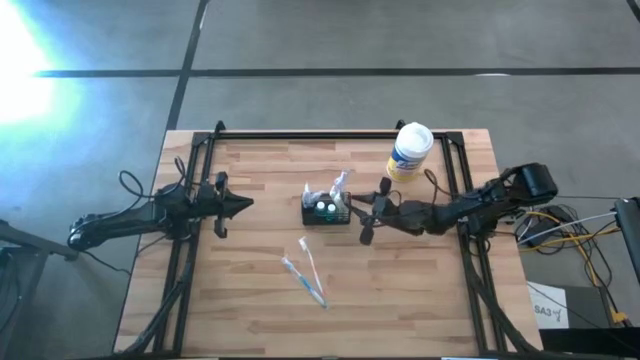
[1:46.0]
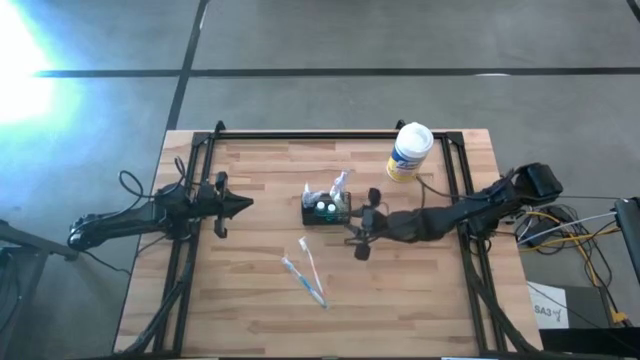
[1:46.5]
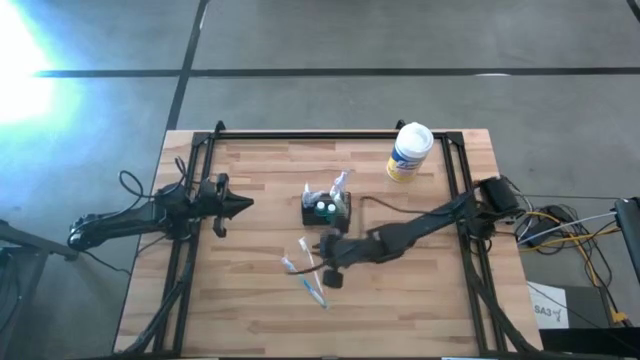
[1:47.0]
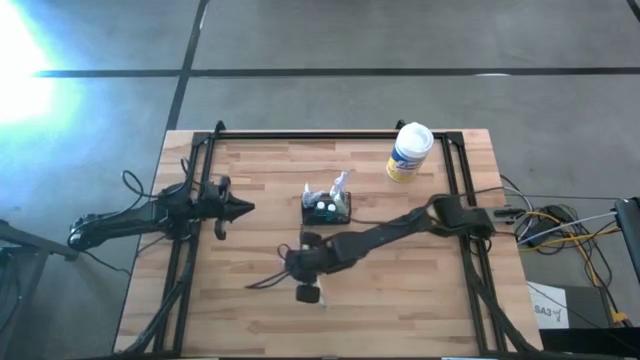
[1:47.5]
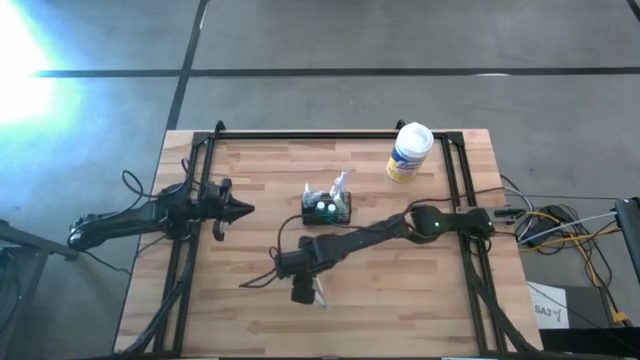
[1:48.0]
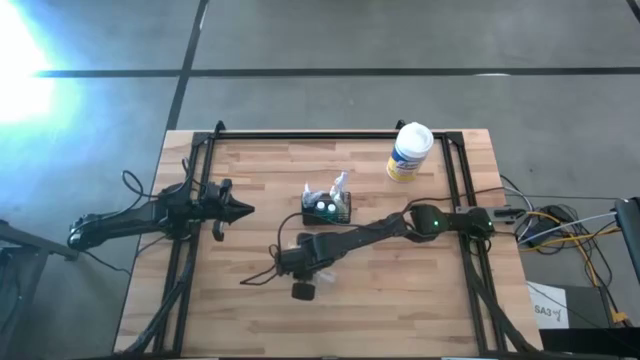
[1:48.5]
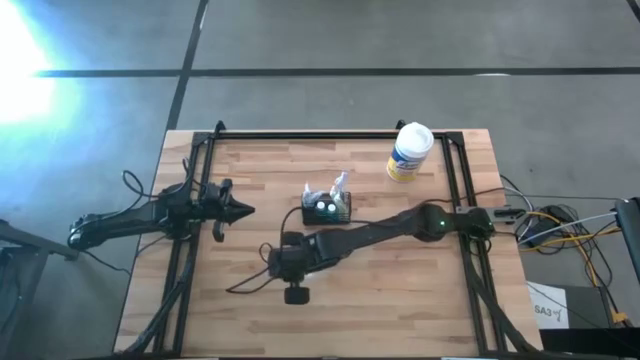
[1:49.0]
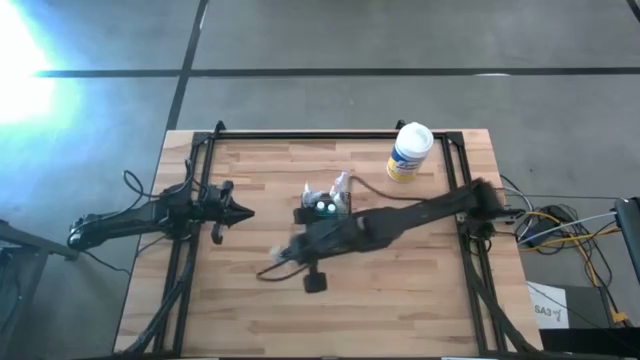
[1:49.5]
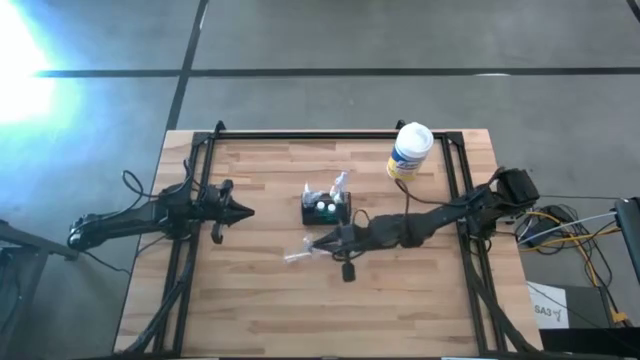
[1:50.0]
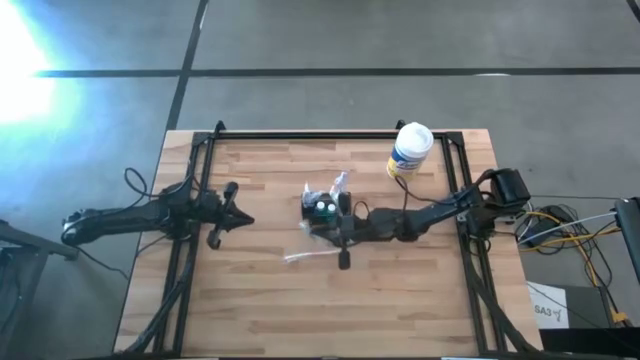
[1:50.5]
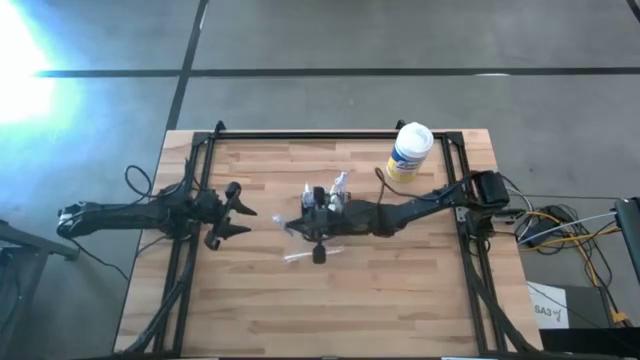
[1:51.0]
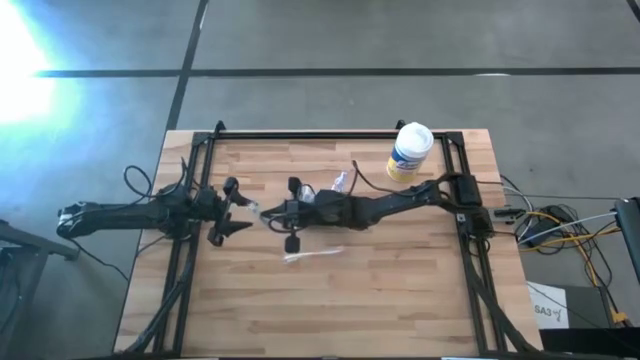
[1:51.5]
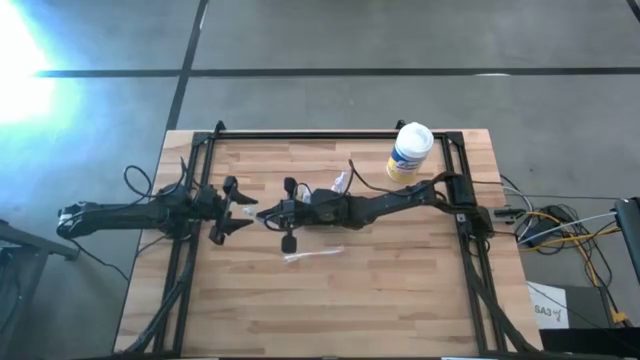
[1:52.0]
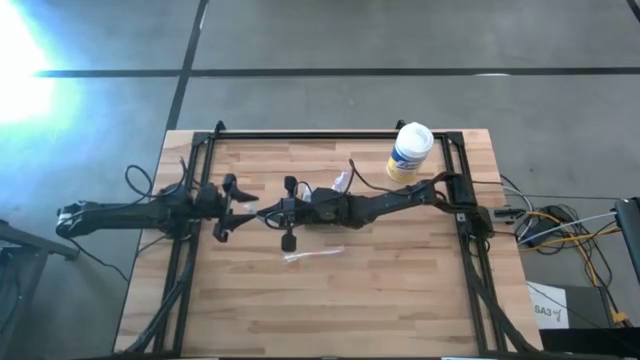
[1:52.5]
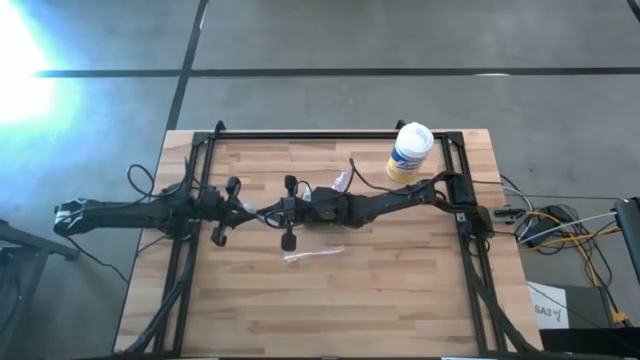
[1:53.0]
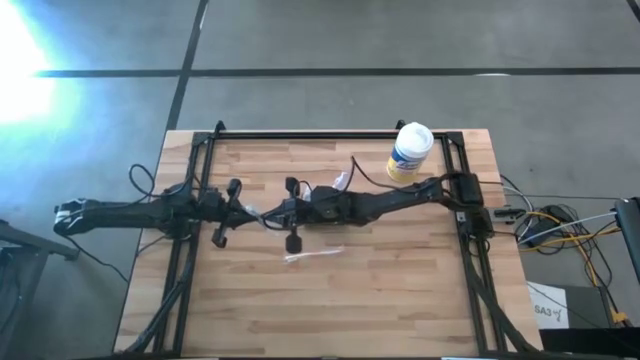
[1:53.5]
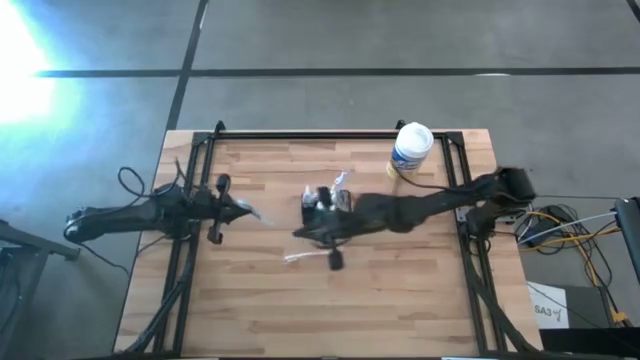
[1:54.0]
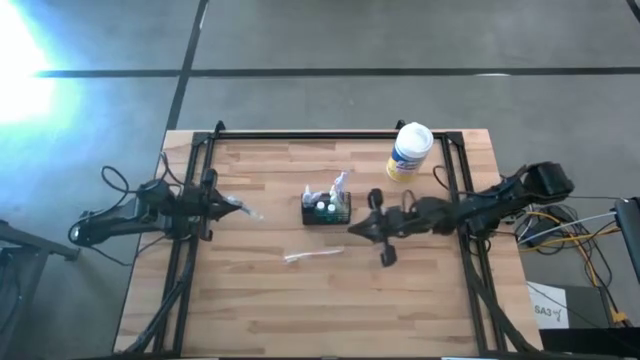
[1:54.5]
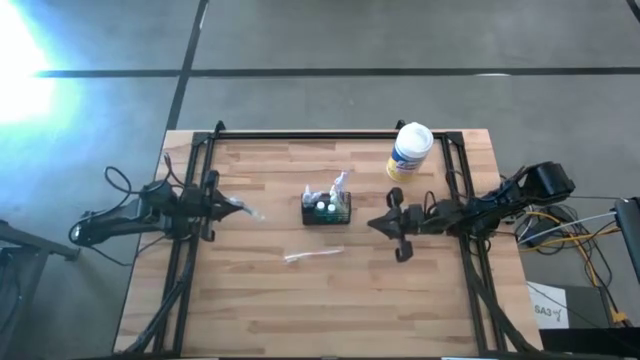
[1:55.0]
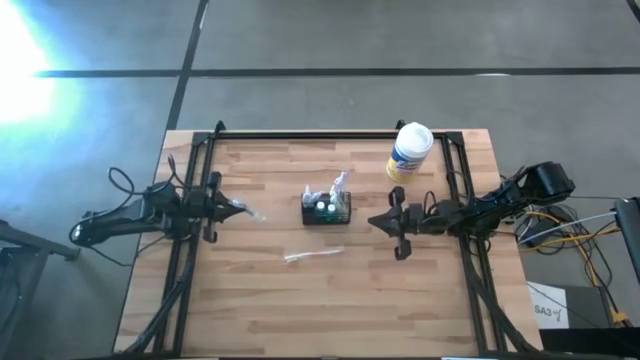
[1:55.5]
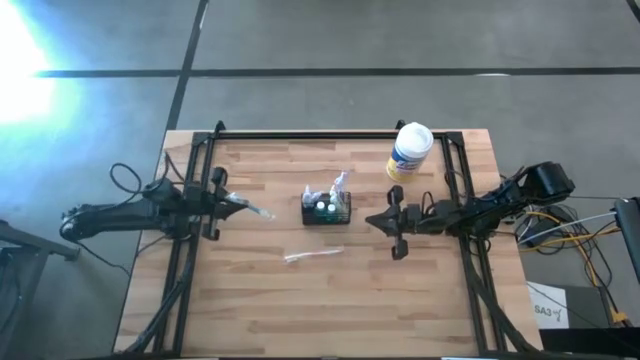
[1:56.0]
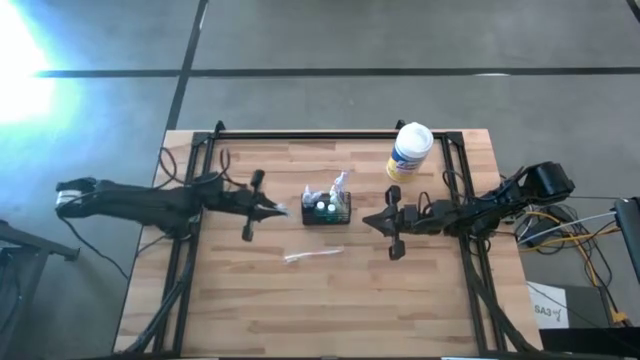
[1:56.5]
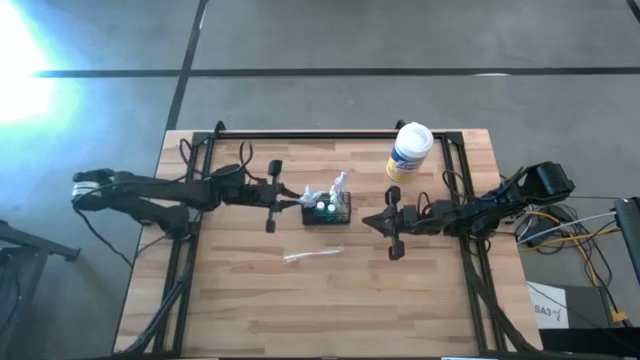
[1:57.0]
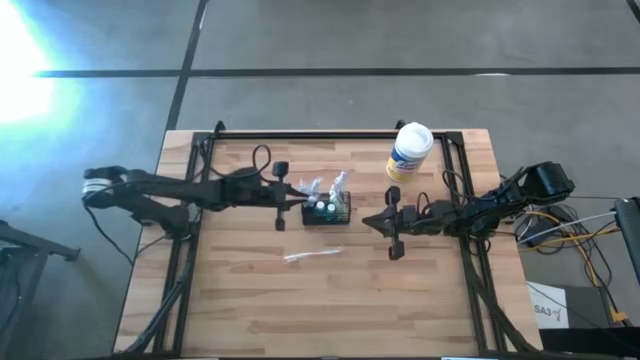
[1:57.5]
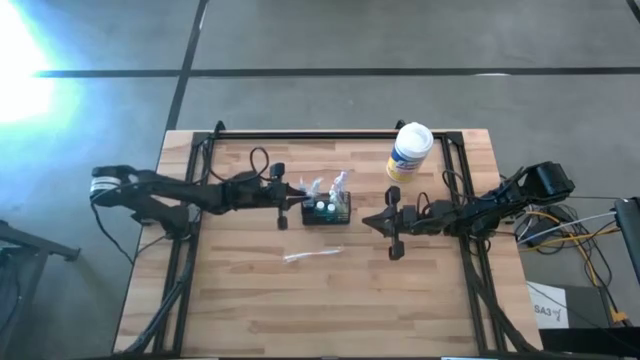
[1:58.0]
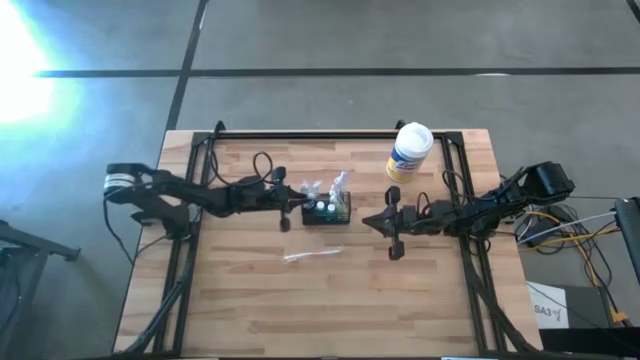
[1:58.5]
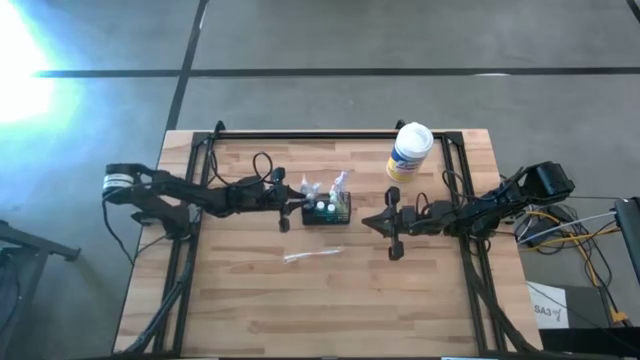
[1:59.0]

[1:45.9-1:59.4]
Task: Pick & Place toothbrushing station
Put the blue toothbrush into the black wire organizer

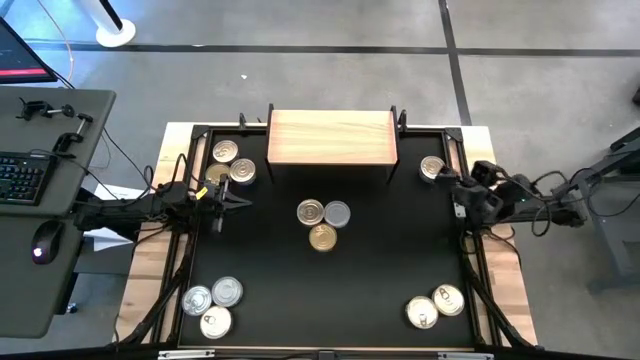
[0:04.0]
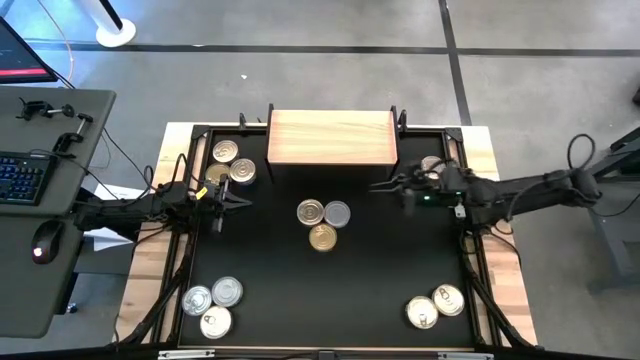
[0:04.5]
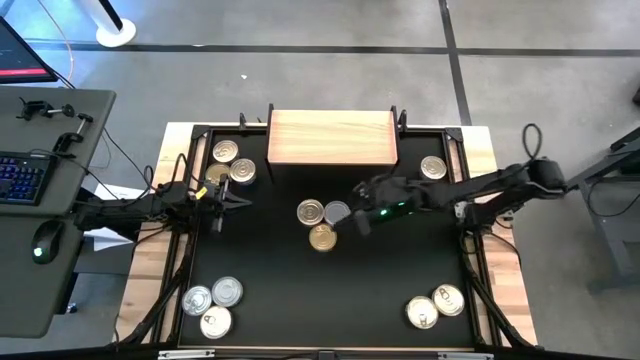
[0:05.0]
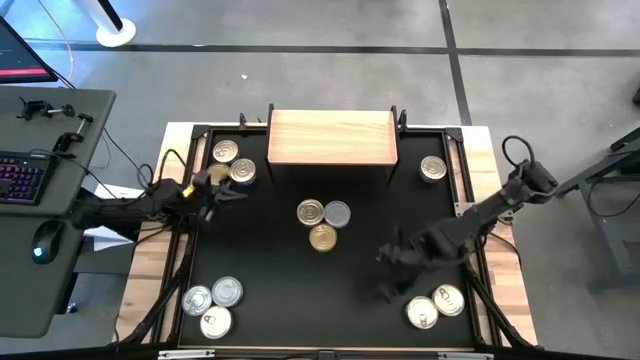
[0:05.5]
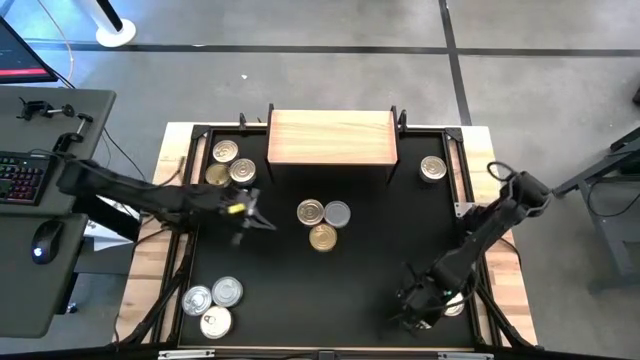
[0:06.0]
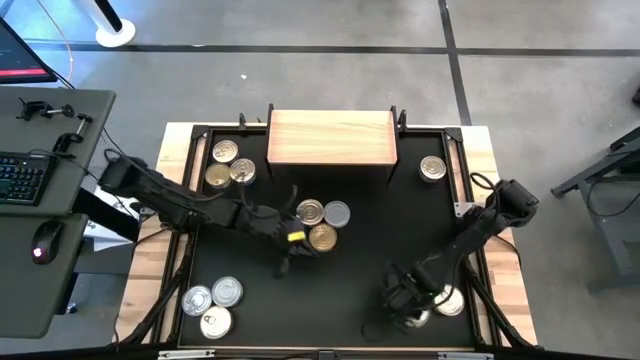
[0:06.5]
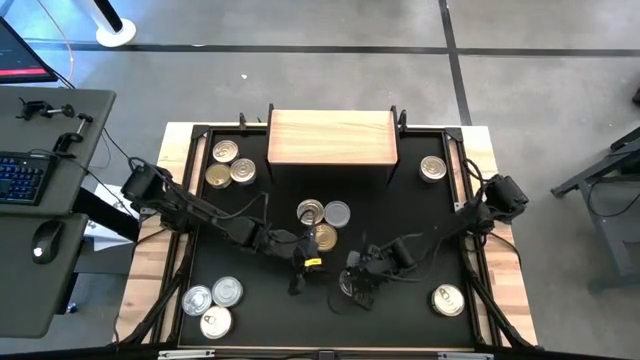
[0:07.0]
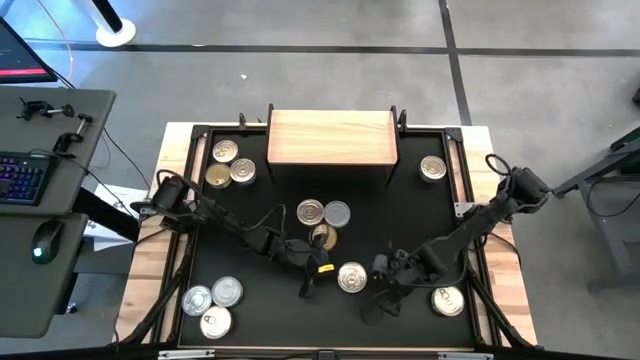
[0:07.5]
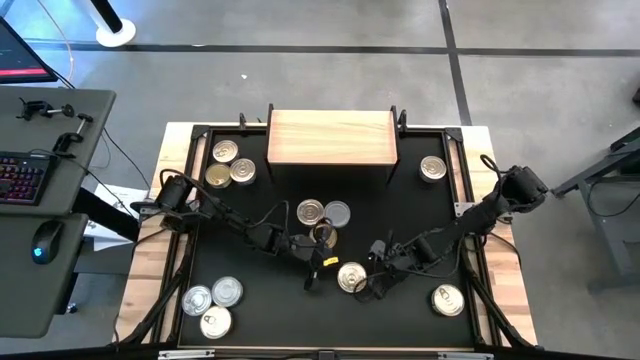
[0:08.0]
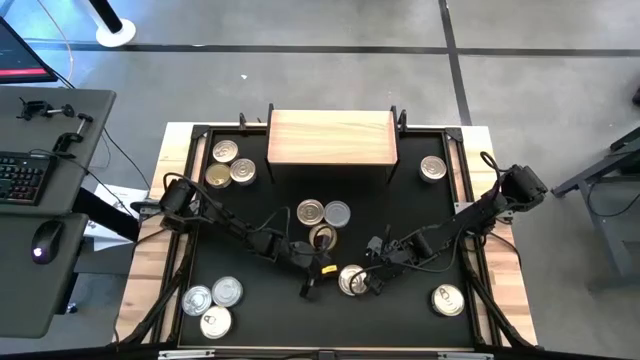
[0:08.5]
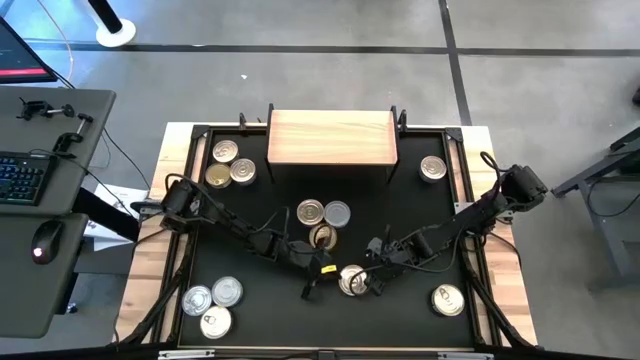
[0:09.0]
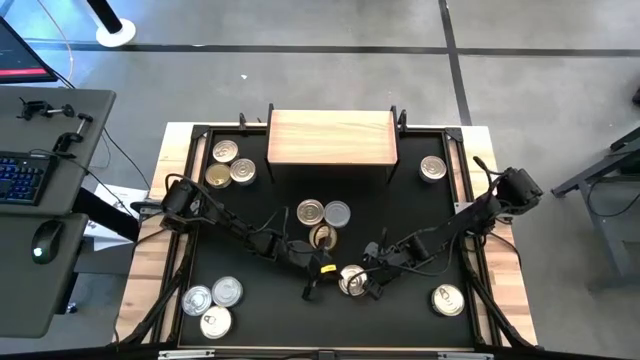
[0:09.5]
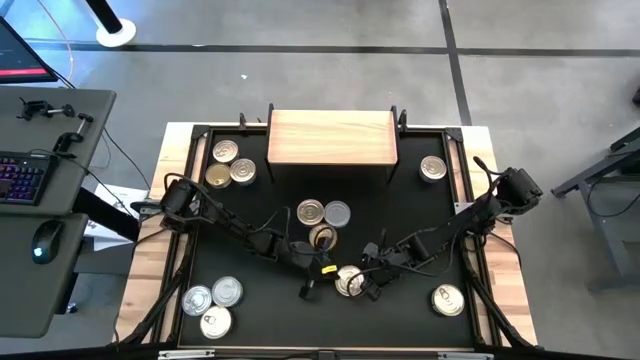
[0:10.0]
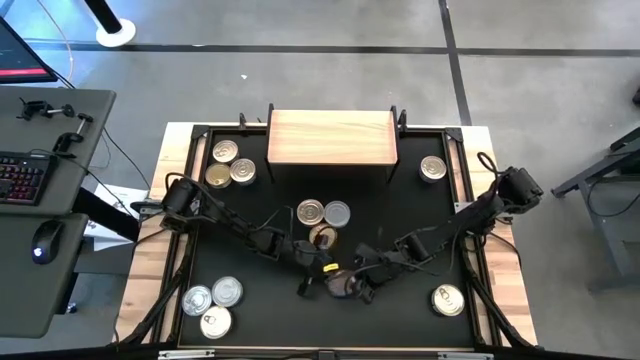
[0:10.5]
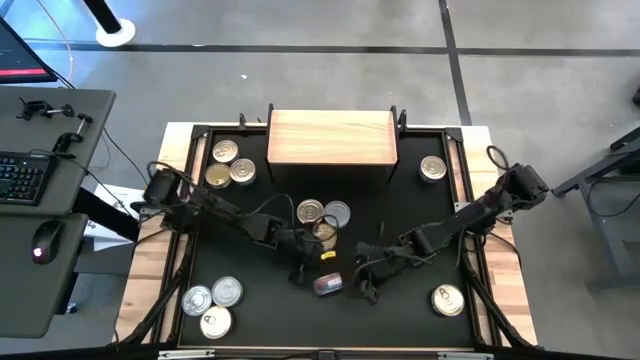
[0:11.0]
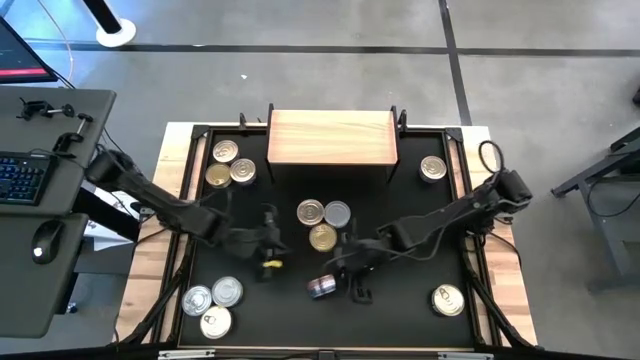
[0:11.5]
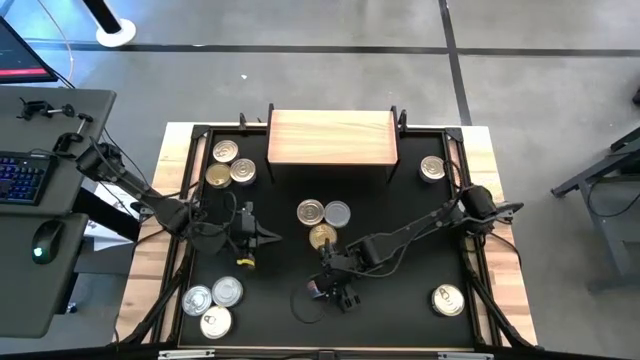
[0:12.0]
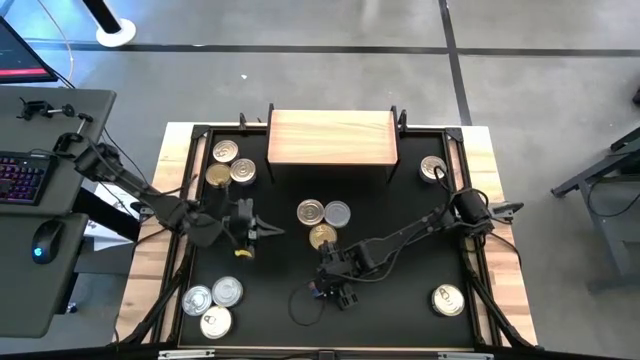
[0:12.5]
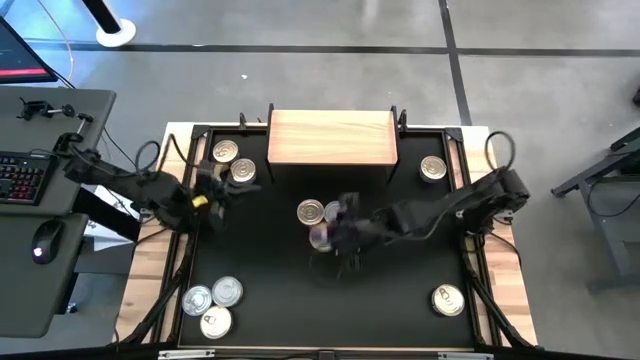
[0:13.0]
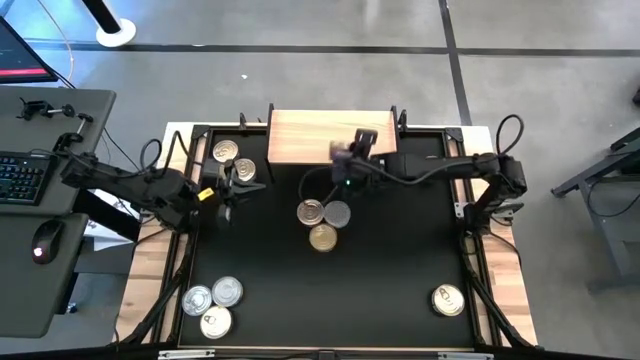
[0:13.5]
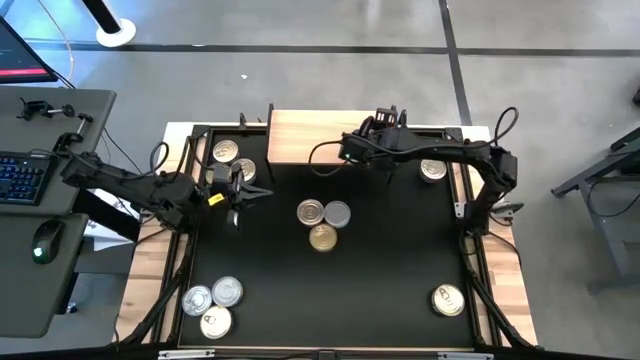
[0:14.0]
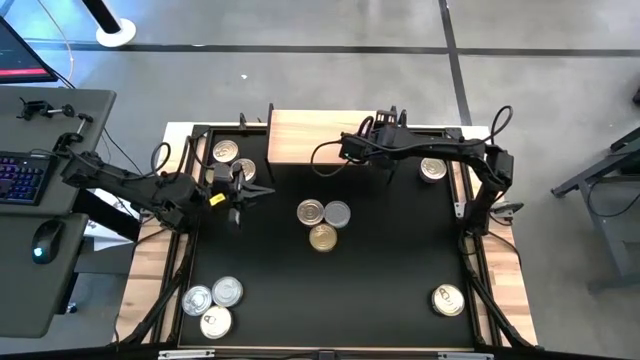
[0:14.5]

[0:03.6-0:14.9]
Task: Stack canned seafood by type on shelf
Put the blue and pink tuna can on the shelf
